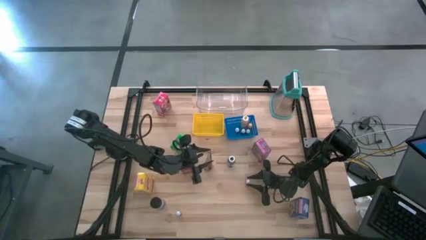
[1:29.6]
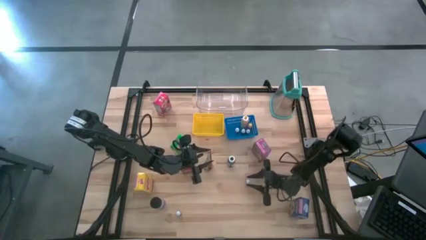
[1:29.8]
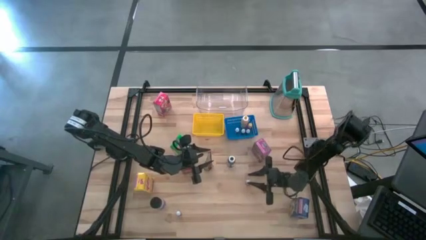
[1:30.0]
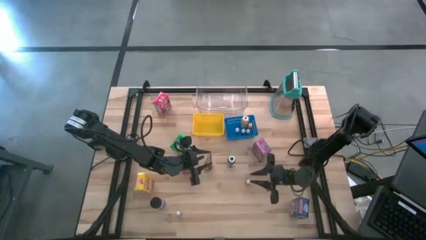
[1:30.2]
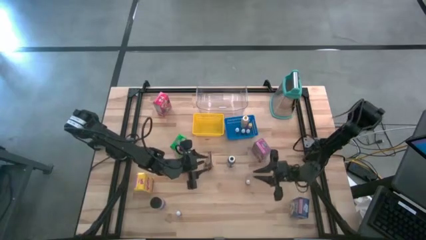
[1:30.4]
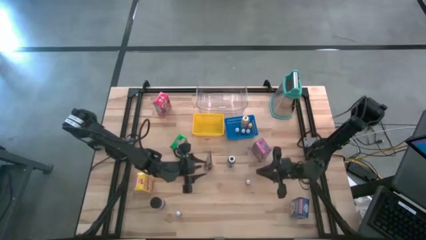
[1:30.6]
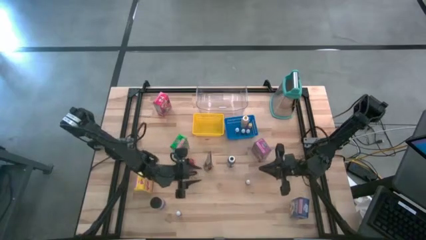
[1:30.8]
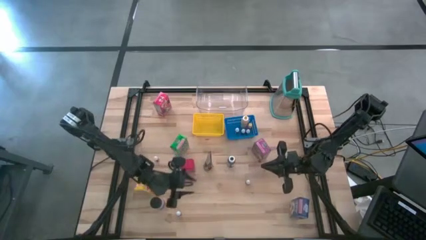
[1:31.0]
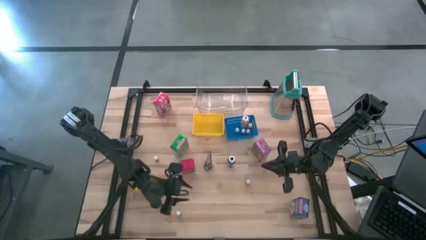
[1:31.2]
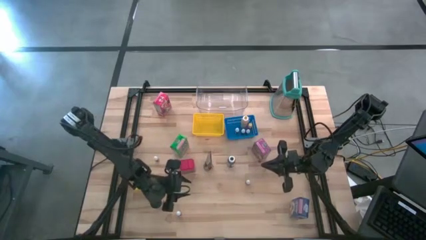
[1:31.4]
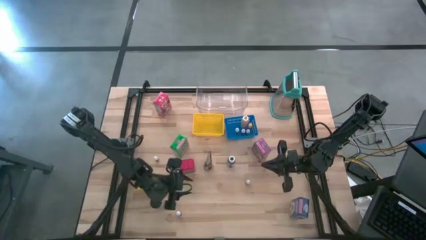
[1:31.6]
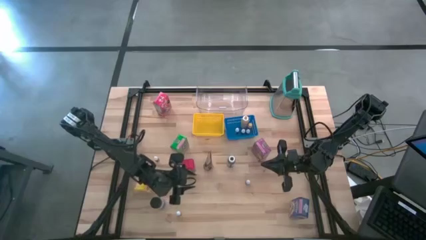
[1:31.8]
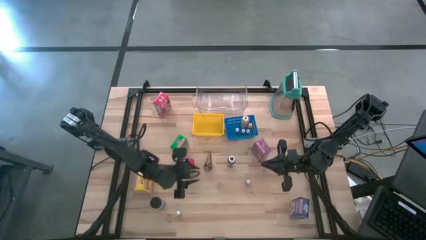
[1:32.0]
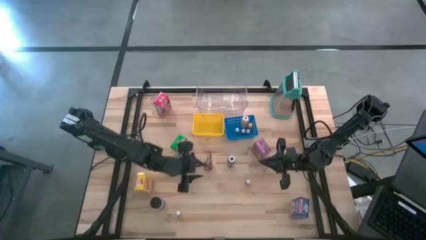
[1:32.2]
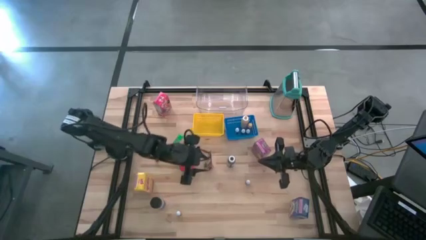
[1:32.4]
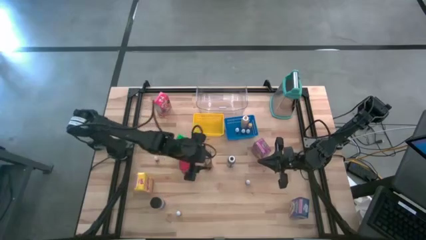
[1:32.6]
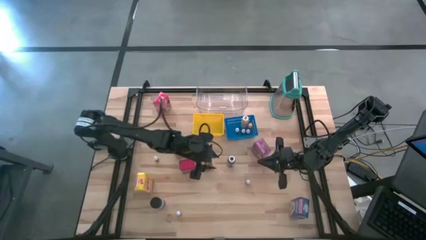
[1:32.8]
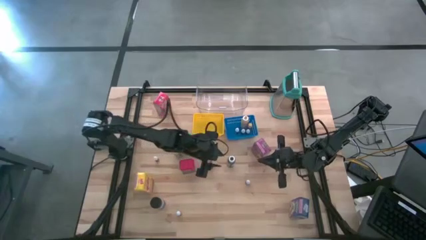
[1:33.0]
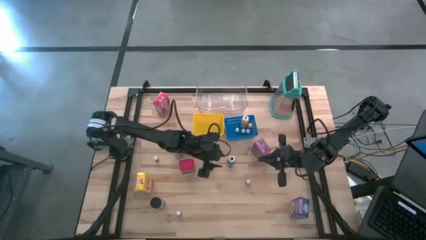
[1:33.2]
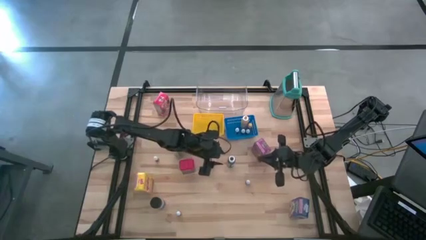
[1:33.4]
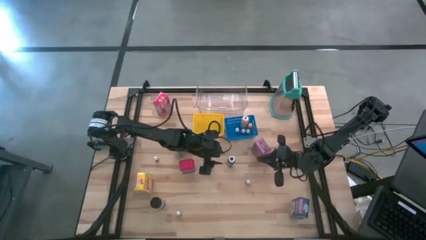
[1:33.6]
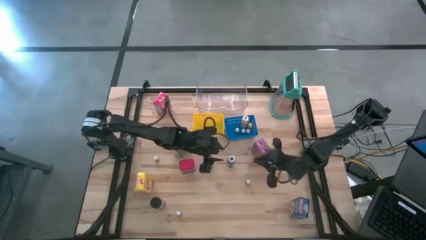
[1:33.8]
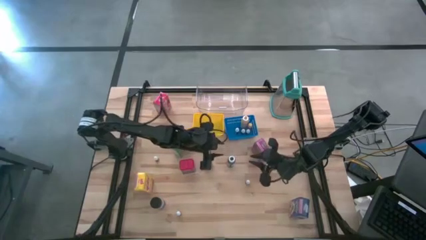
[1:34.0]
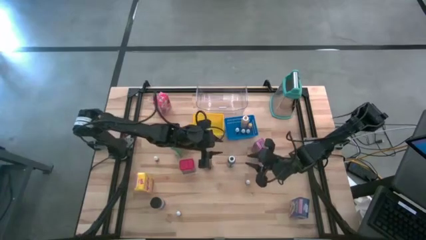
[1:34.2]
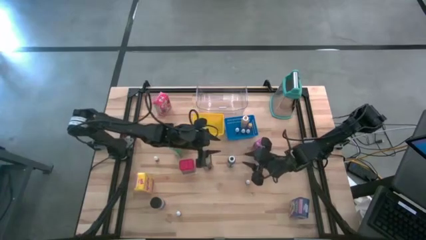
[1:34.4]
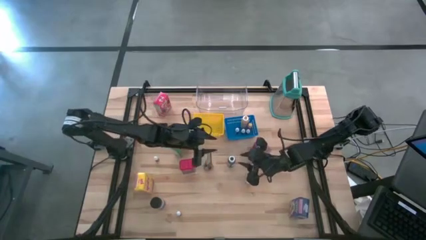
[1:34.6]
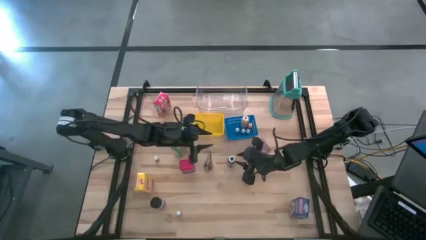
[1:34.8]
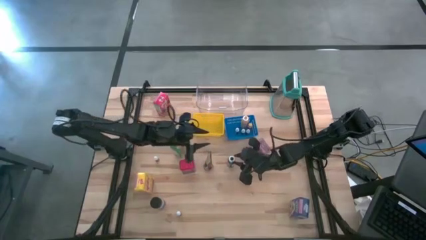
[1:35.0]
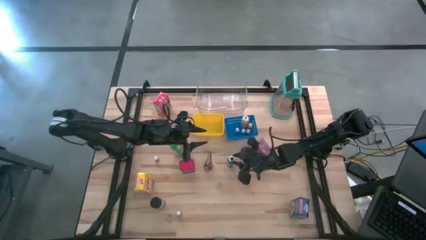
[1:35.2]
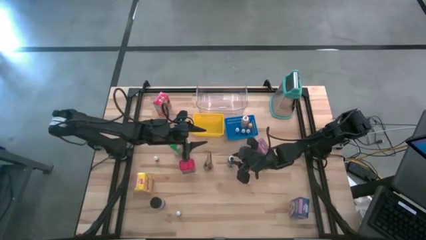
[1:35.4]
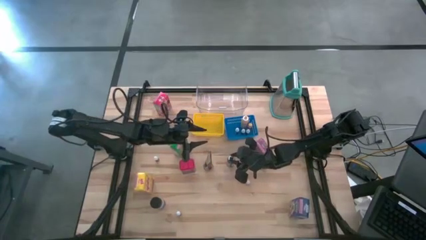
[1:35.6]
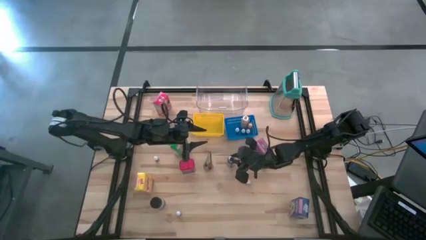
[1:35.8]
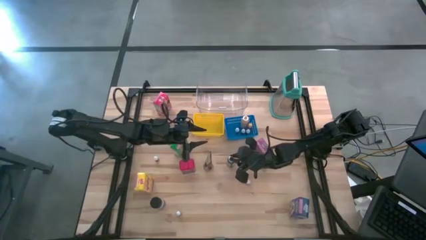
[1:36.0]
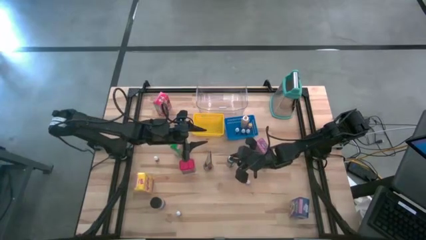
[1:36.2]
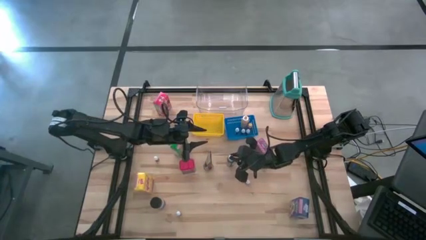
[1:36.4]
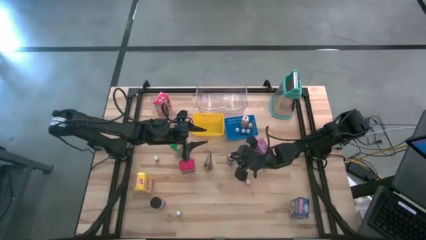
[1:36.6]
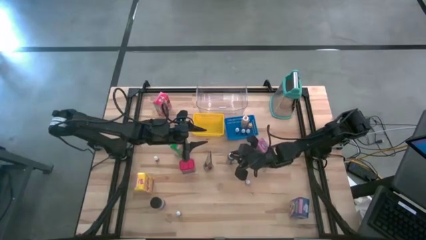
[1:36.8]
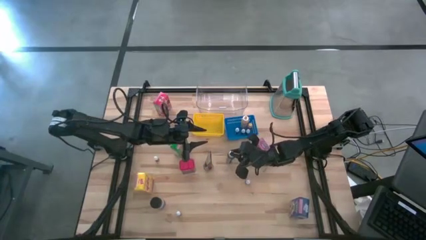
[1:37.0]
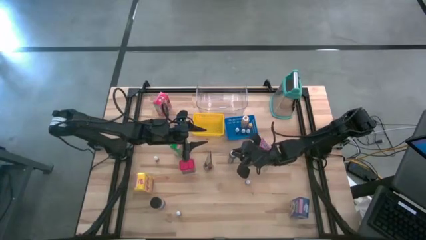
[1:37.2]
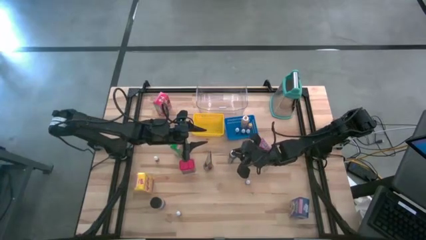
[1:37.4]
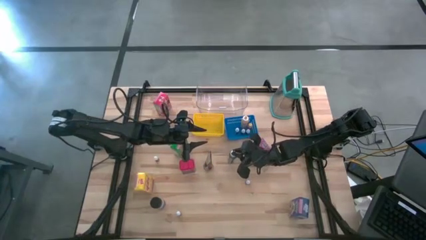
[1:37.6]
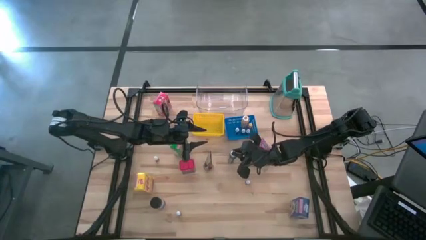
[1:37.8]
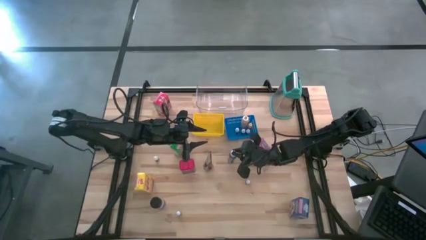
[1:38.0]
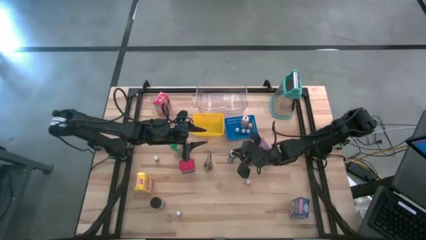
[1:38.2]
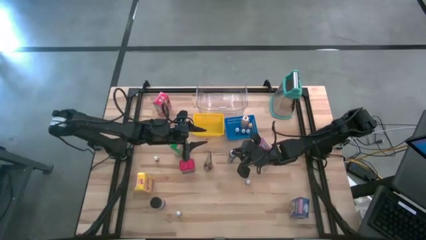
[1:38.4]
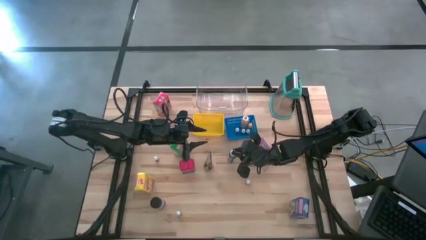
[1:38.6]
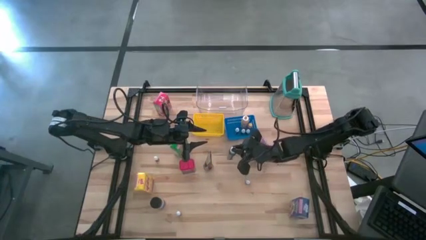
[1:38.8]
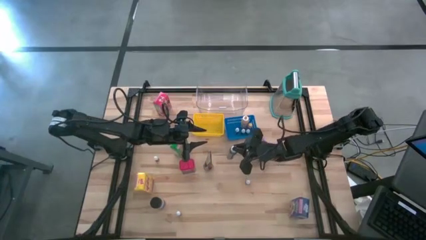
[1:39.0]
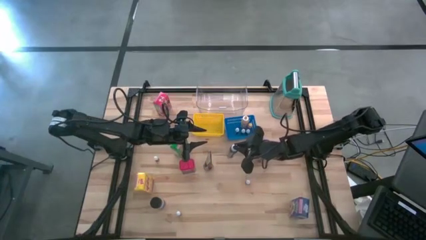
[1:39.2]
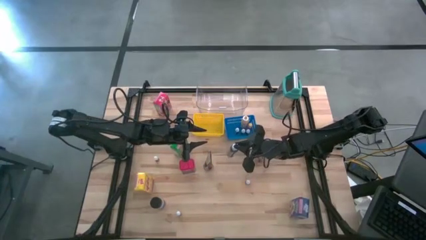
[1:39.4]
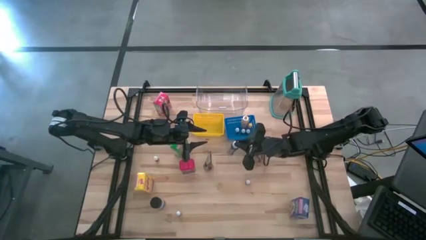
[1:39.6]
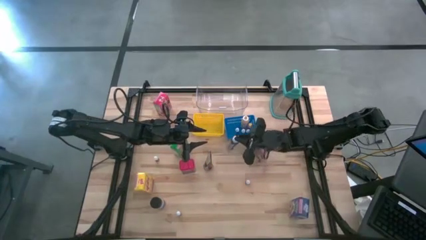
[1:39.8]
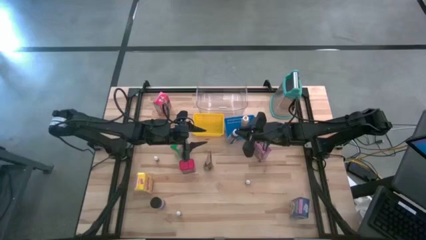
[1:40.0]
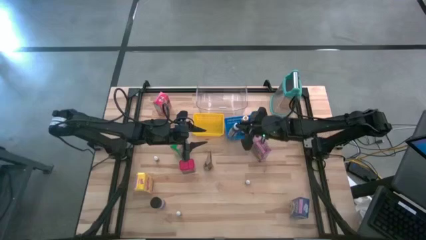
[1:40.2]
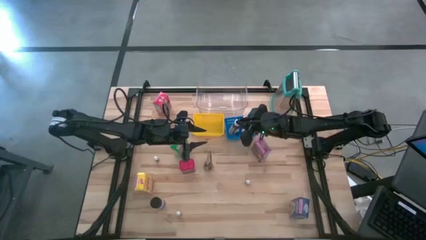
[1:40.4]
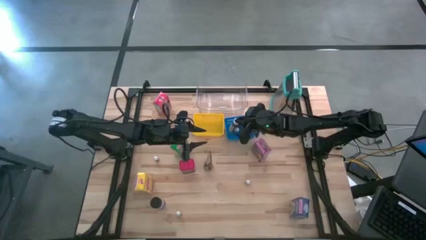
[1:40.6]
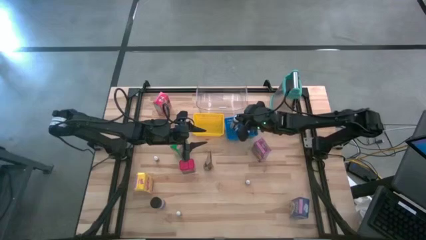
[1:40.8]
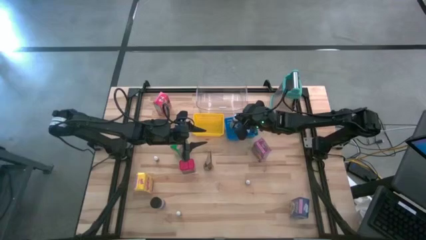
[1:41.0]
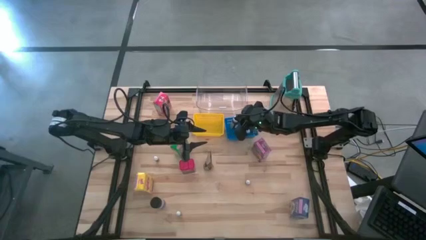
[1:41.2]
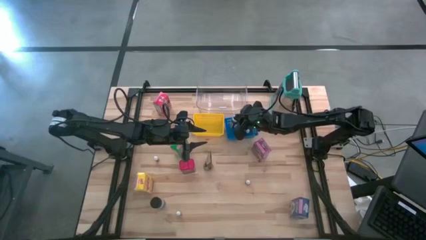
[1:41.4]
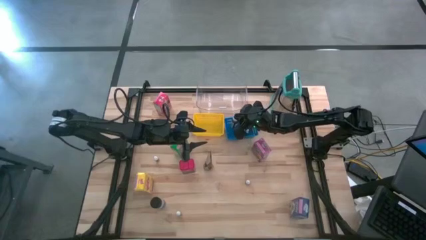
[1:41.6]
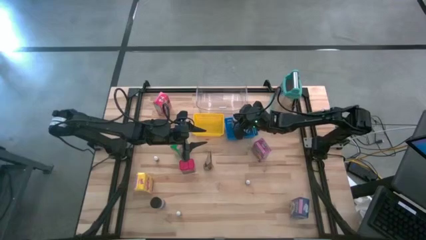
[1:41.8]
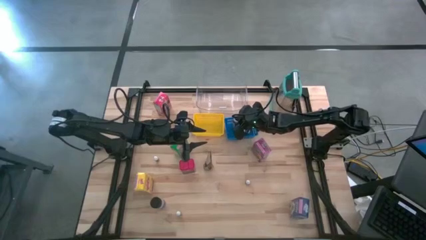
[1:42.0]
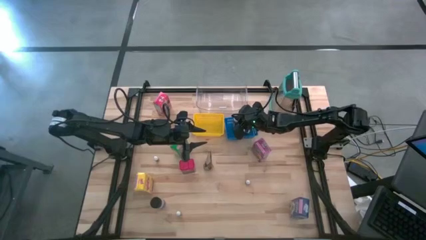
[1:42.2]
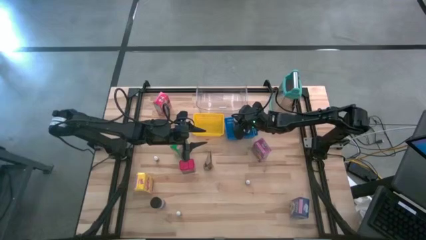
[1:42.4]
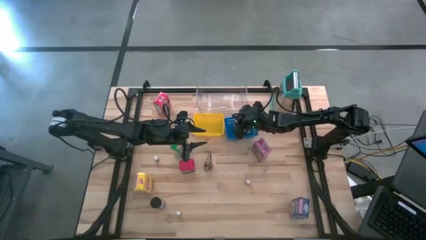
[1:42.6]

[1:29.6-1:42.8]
Task: Pick & Place Kitchen Items
Put the black food coloring bottle into the blue bin
